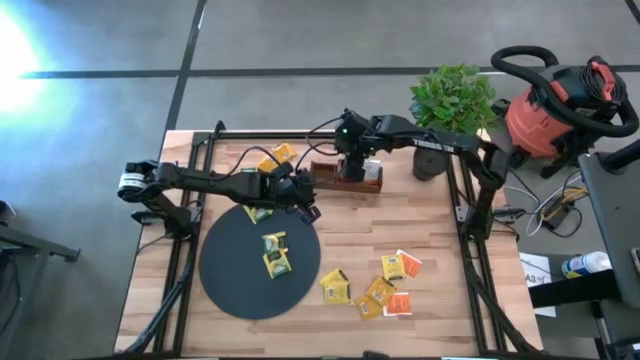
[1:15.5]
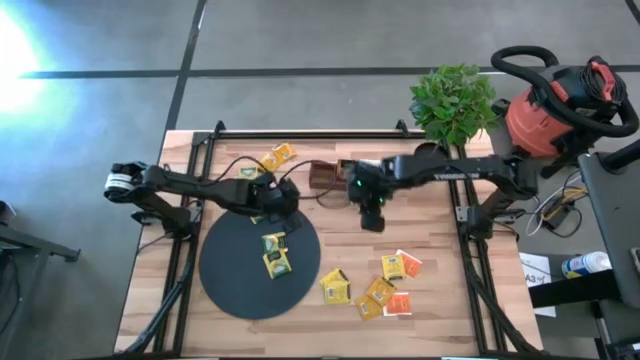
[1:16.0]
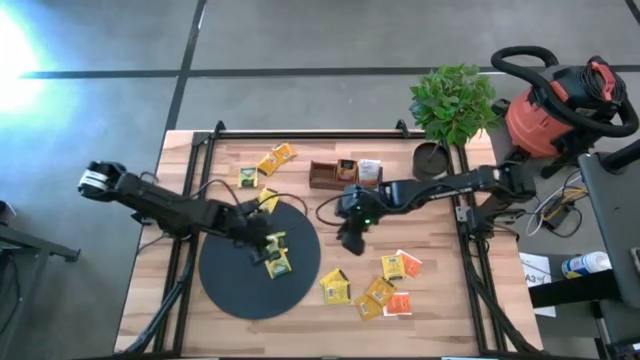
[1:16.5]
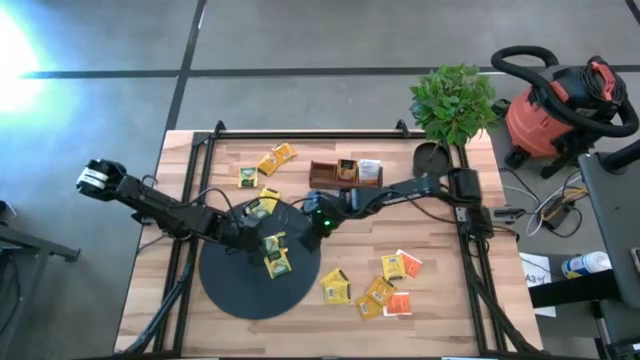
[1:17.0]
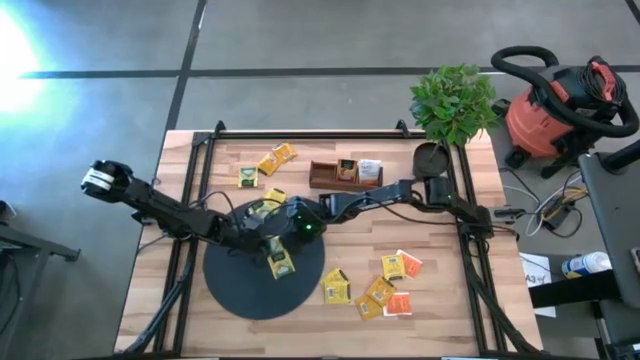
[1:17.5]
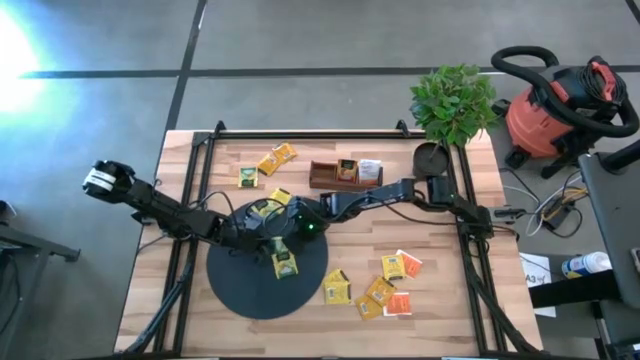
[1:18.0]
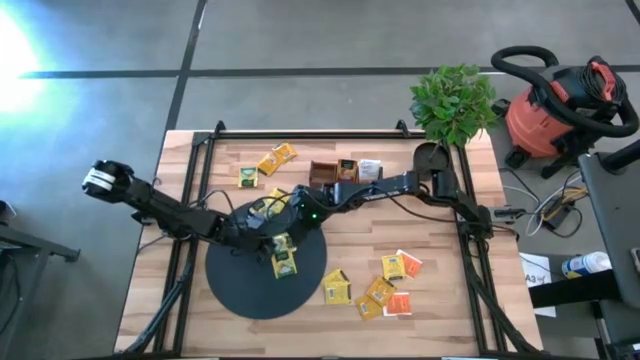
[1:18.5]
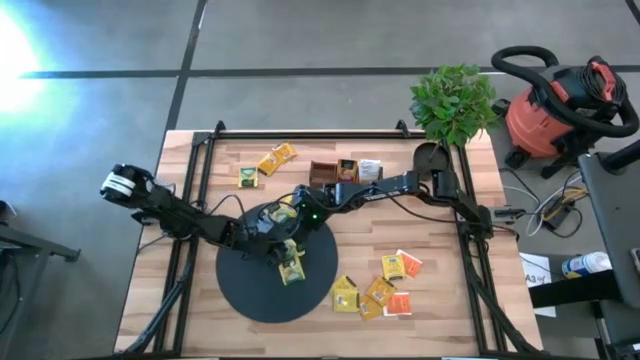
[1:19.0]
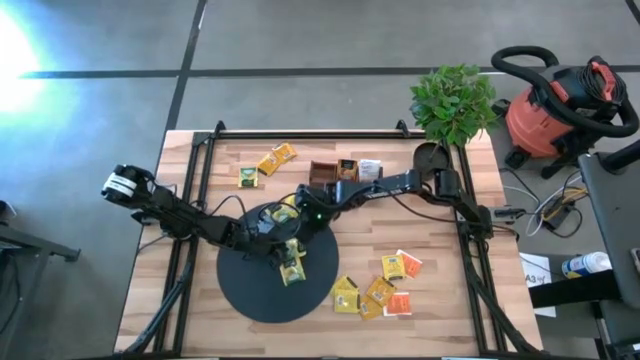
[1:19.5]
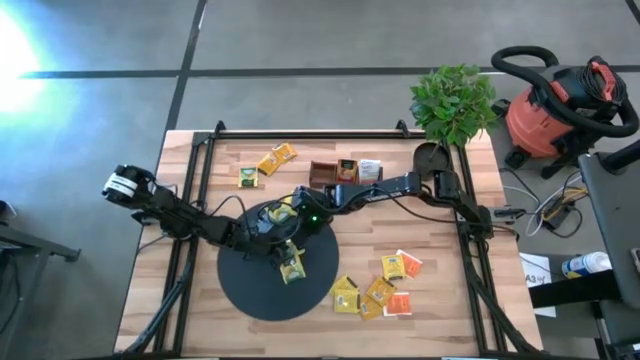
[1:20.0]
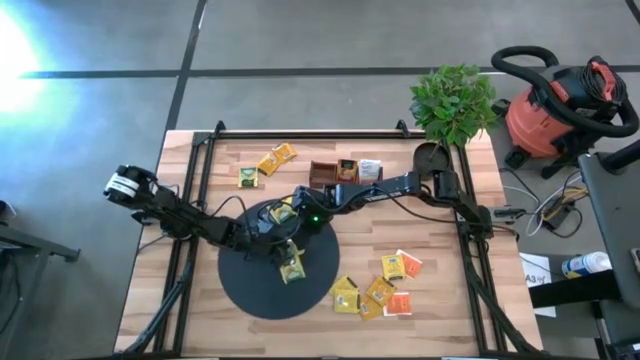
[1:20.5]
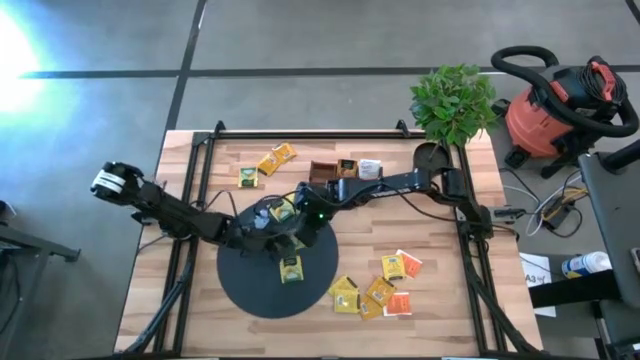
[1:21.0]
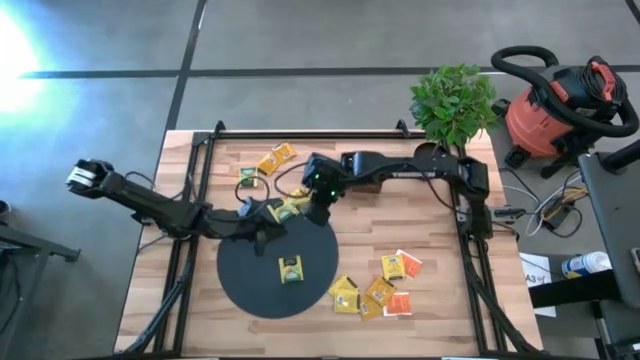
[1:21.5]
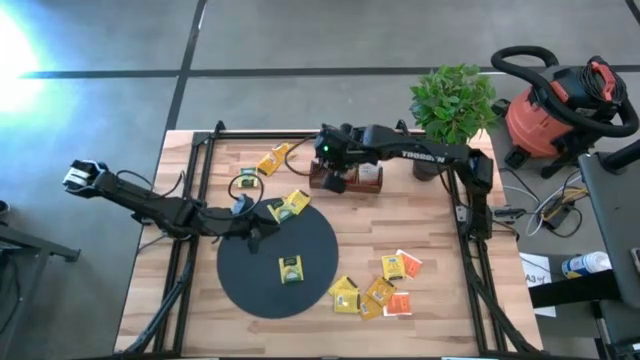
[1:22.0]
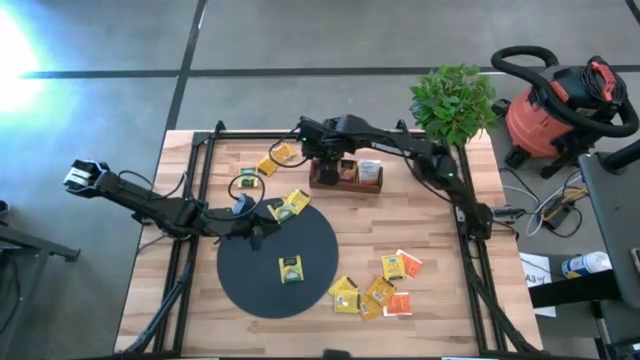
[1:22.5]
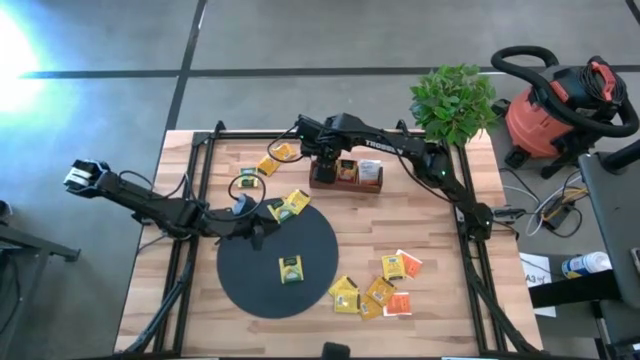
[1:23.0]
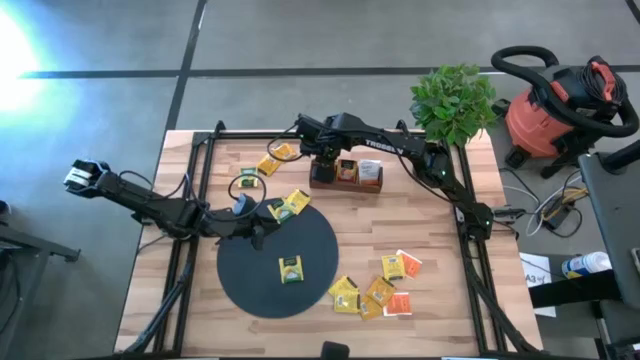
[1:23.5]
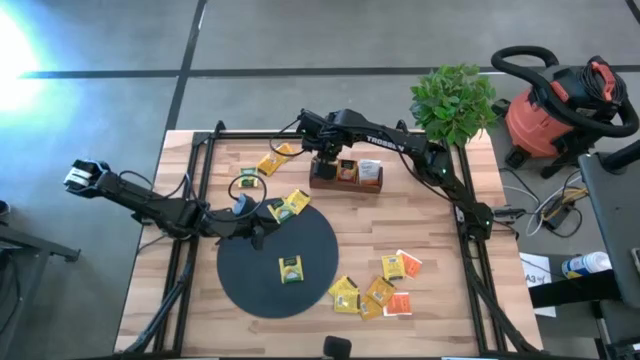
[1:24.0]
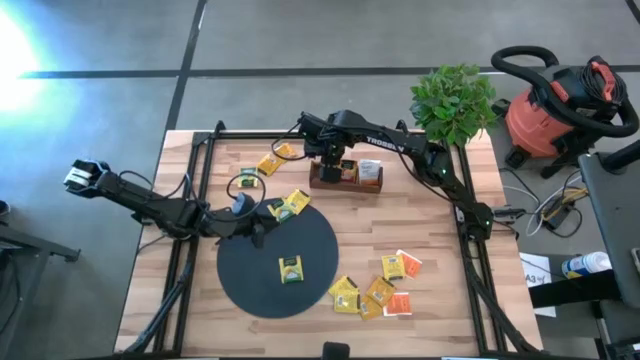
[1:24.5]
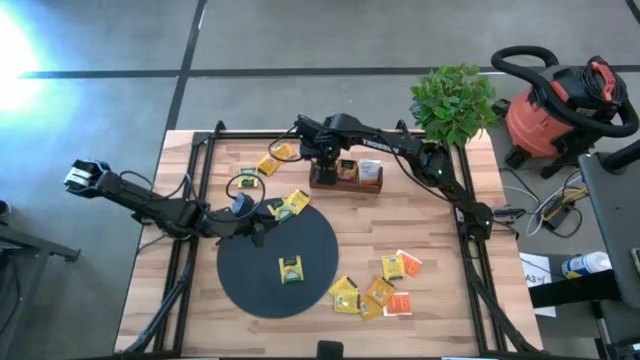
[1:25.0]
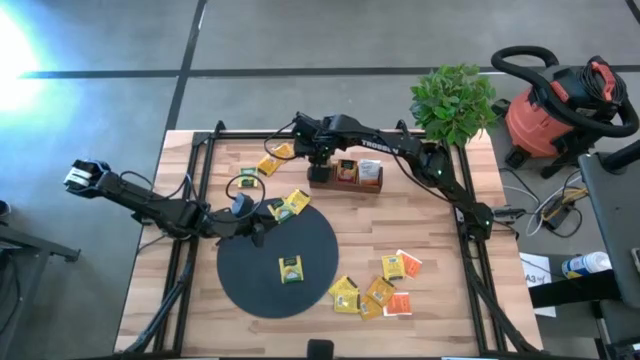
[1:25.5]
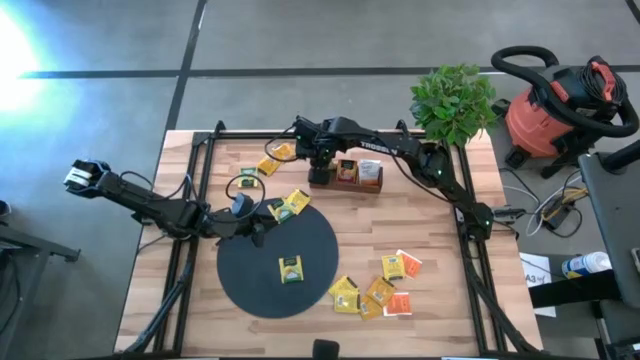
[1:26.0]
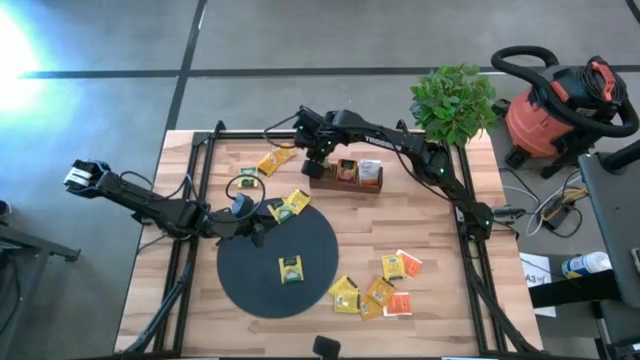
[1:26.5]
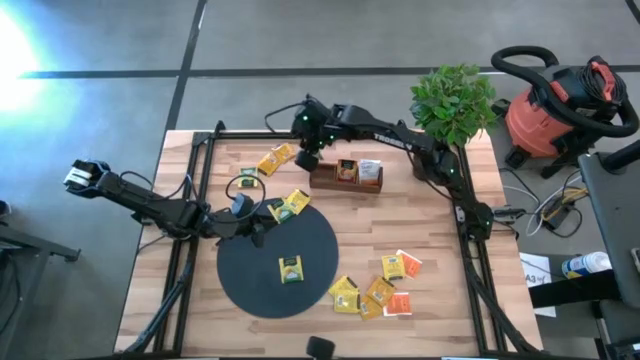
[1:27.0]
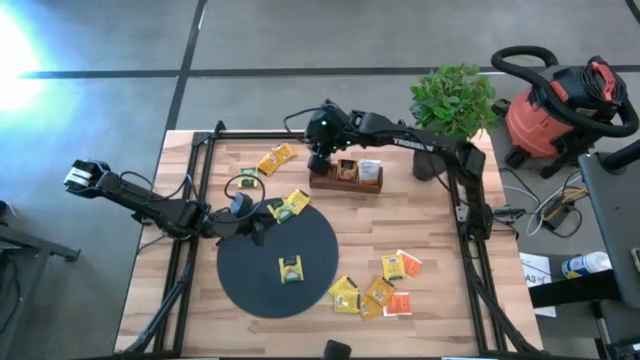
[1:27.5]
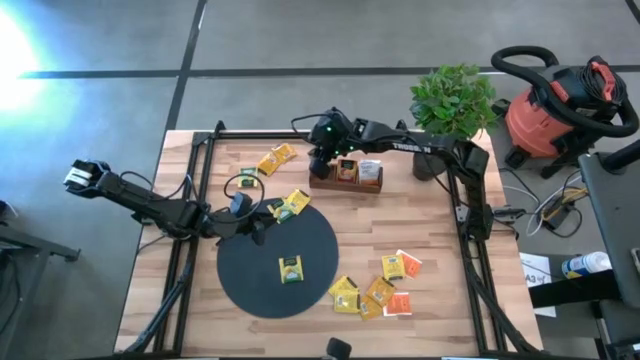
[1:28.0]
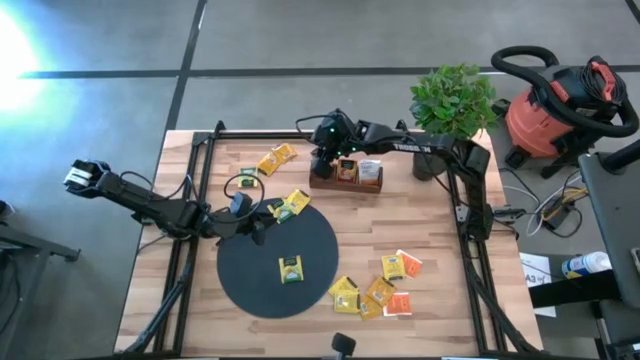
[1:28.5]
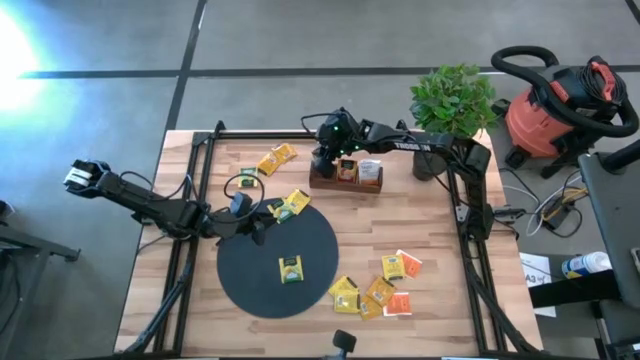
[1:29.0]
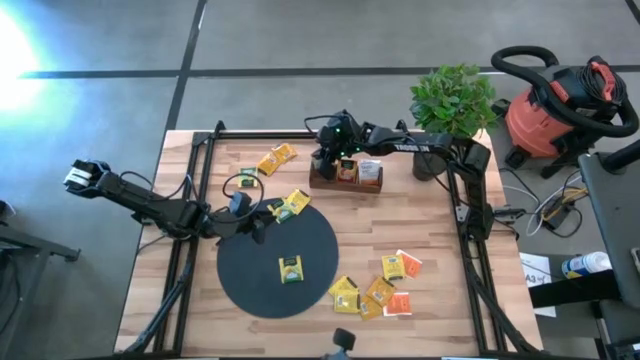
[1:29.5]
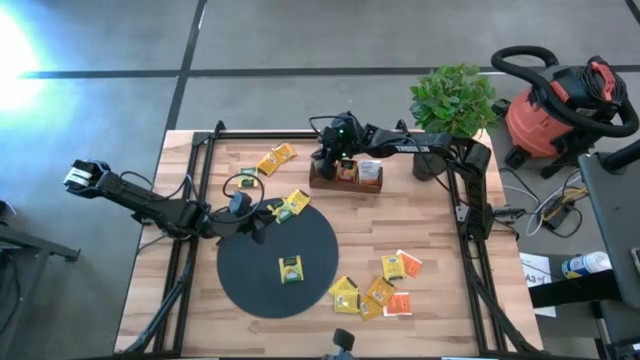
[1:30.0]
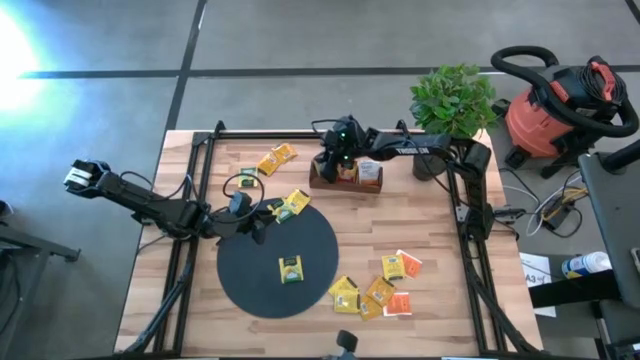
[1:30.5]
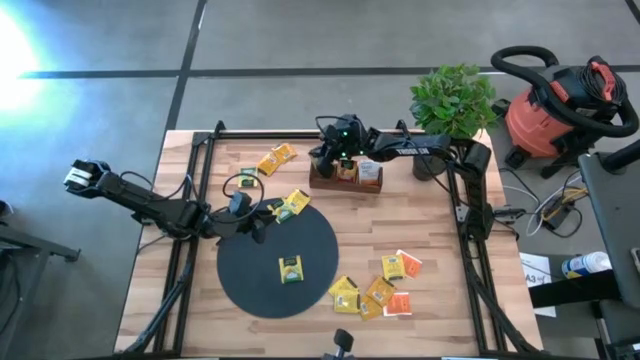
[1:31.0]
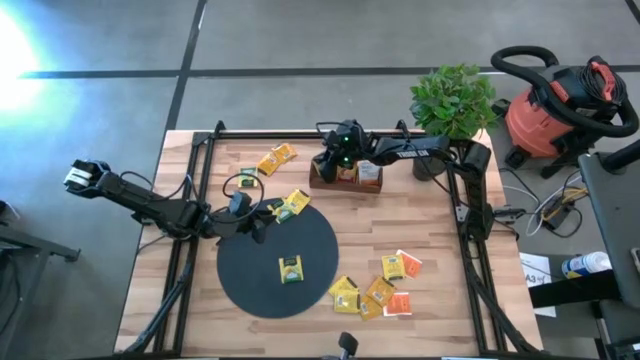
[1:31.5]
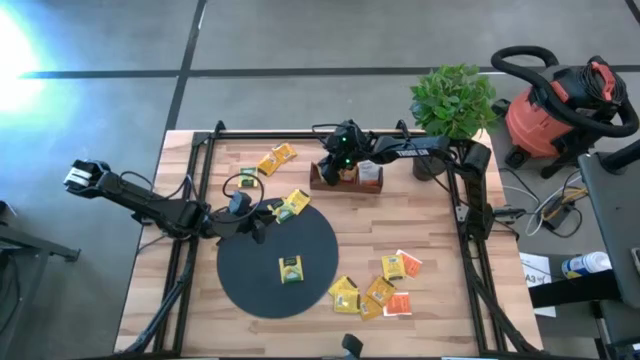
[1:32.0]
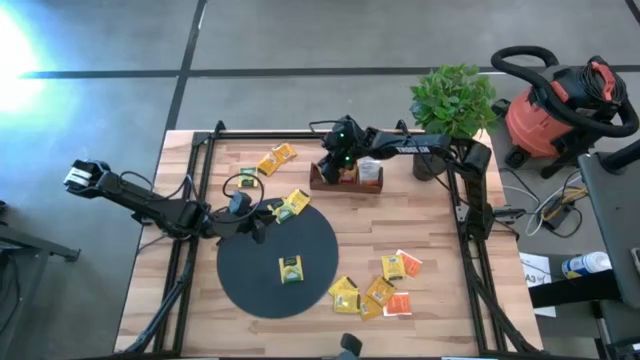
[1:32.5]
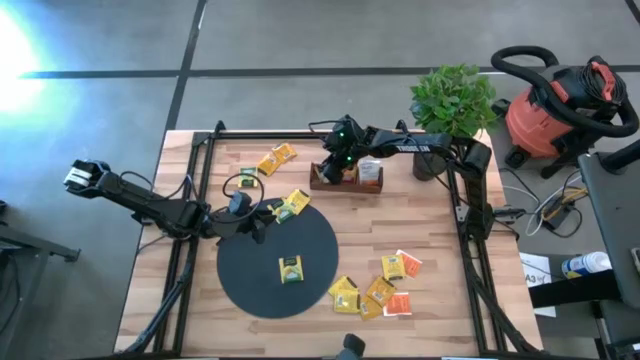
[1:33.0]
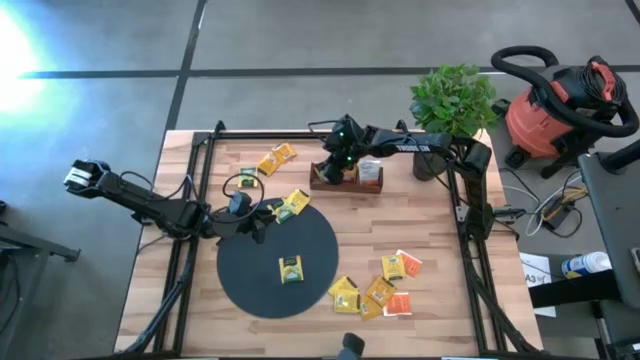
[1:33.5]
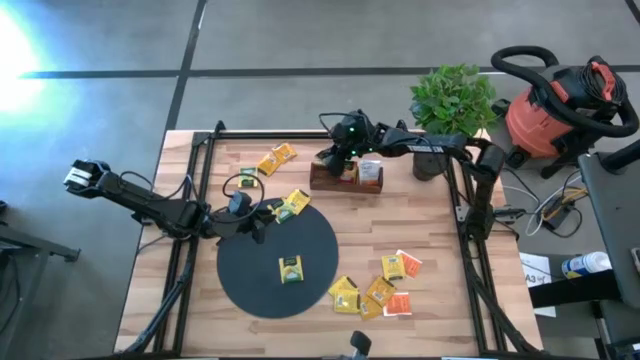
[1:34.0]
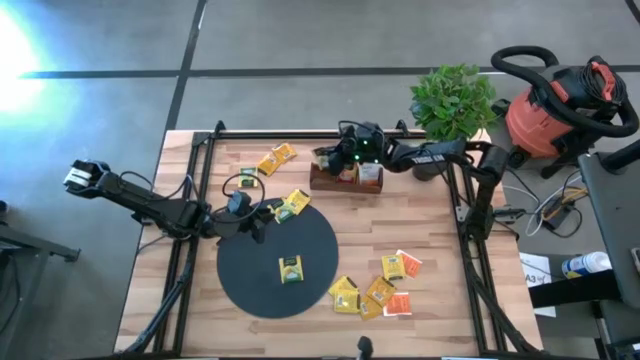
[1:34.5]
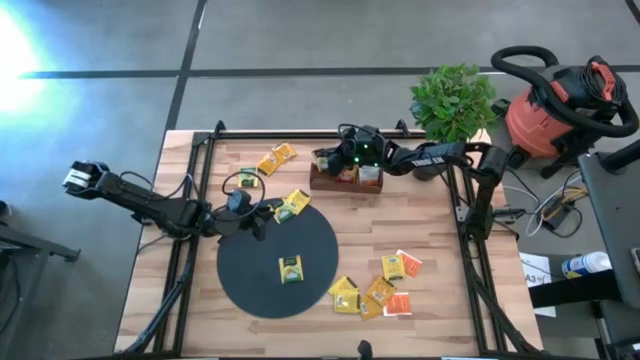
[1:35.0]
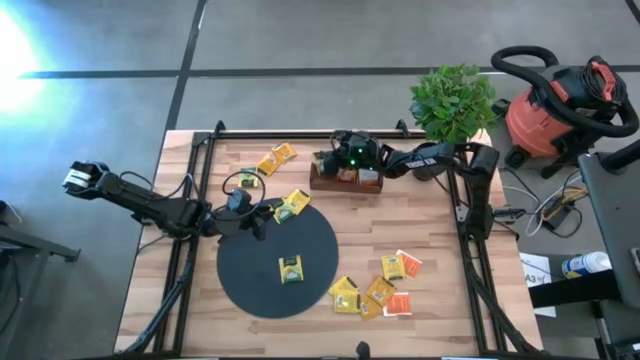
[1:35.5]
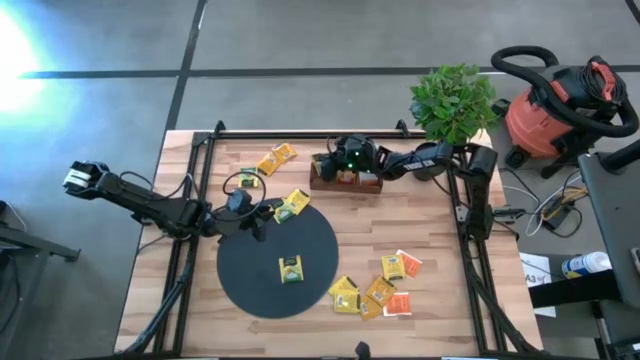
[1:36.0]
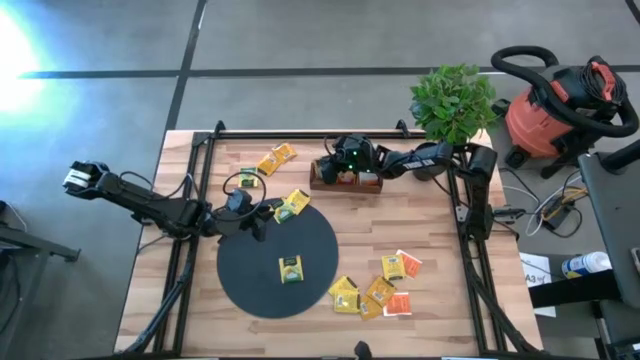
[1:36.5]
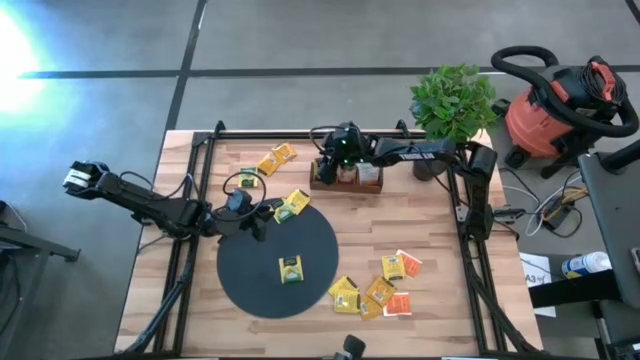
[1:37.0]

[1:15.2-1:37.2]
Task: Pick & Place Tea
Put the yellow tea bag into the left section of the wooden organizer
